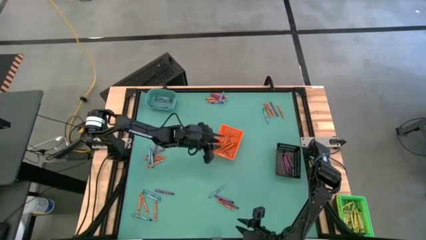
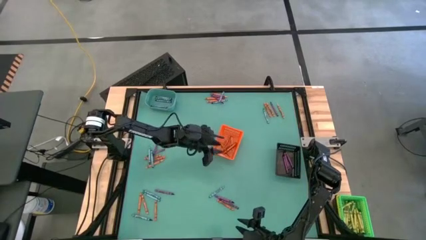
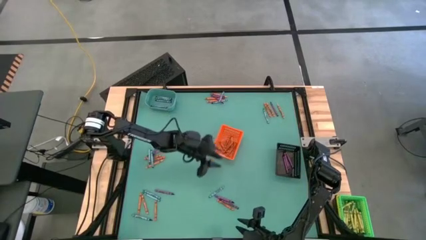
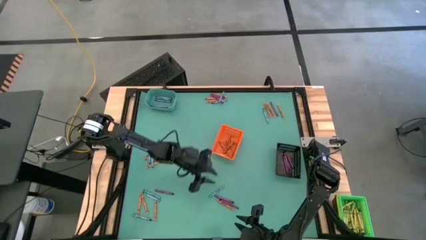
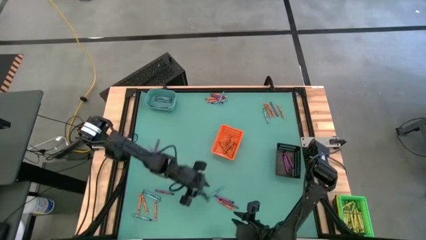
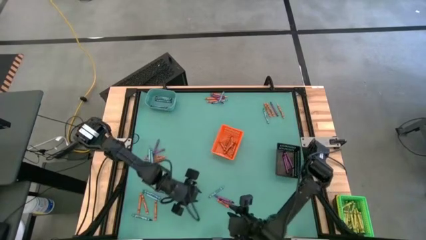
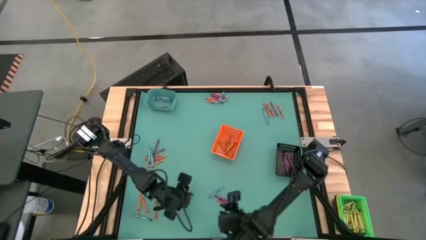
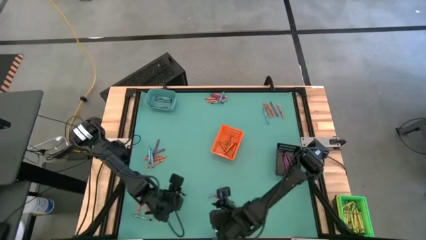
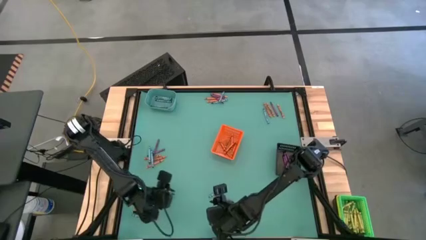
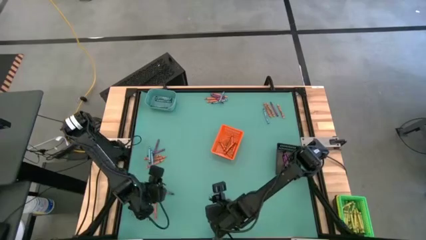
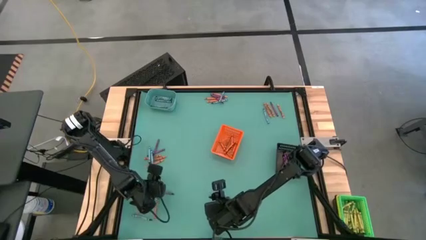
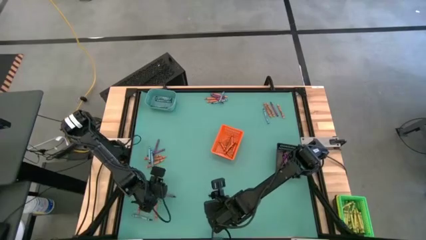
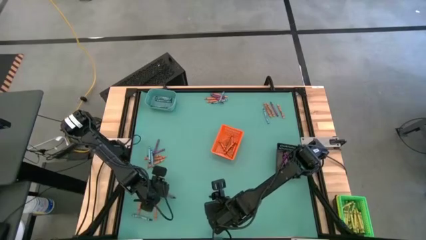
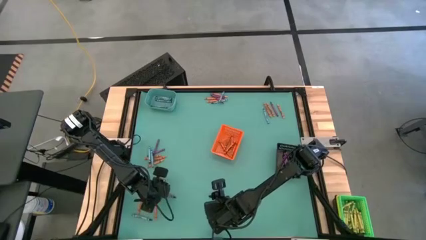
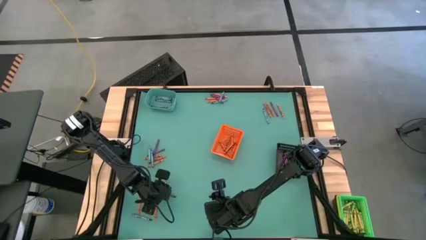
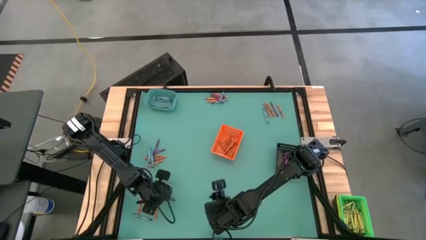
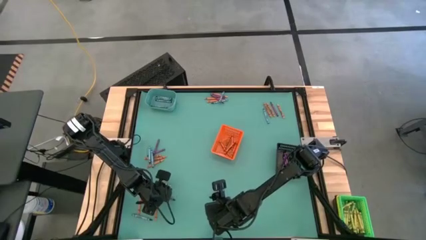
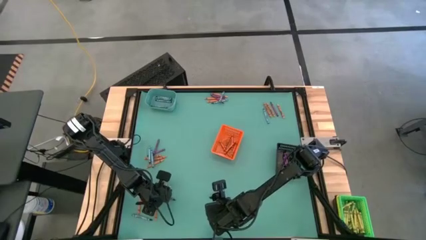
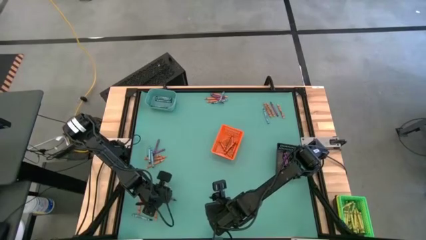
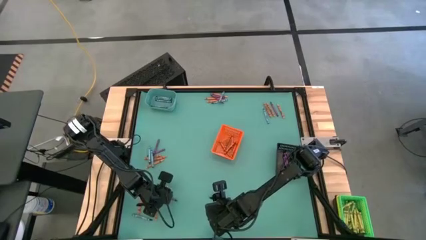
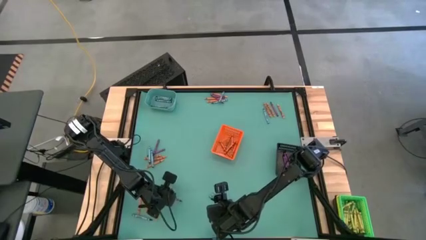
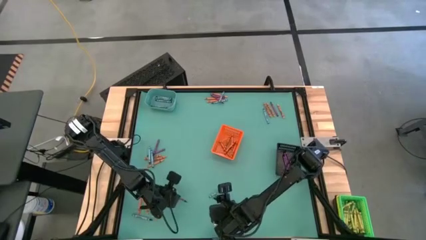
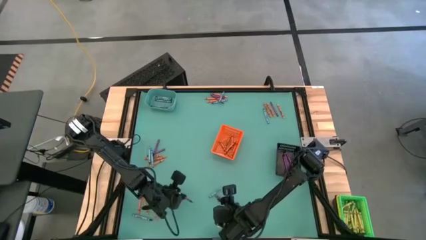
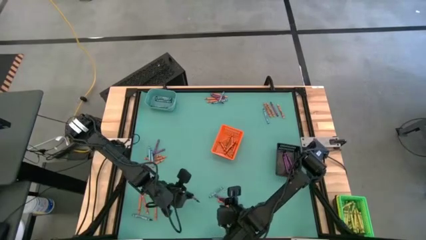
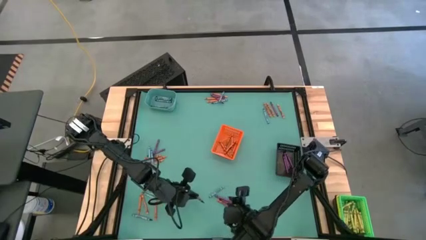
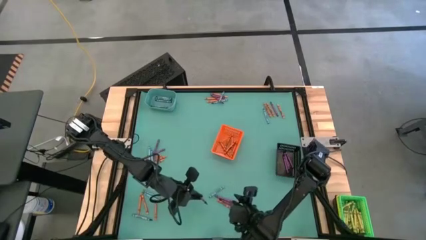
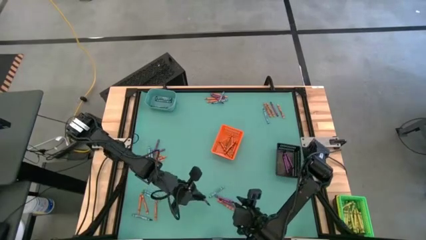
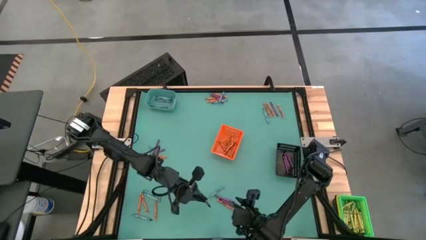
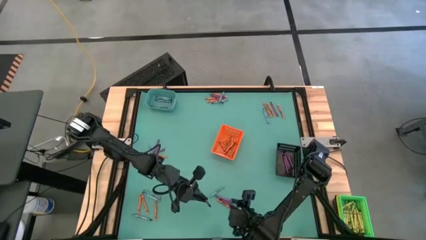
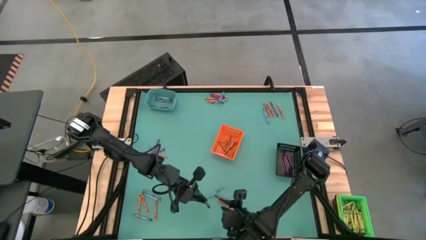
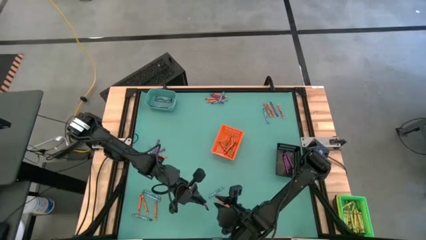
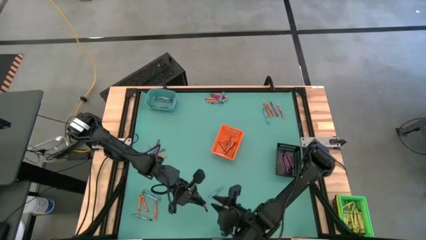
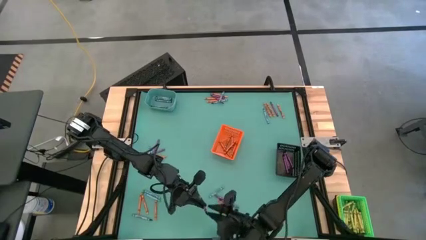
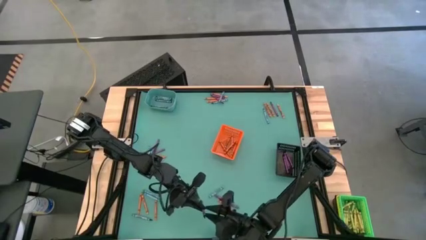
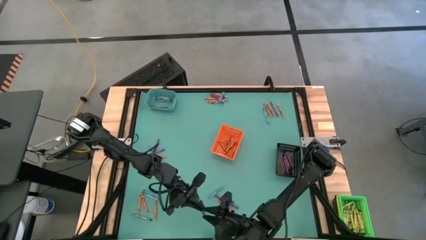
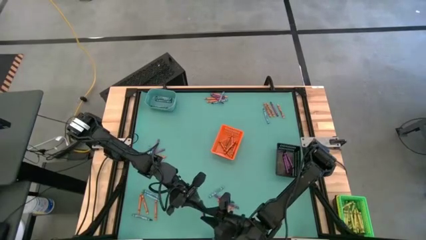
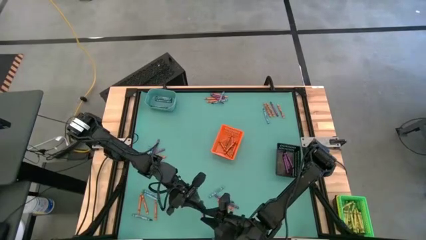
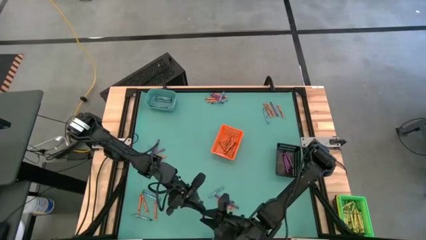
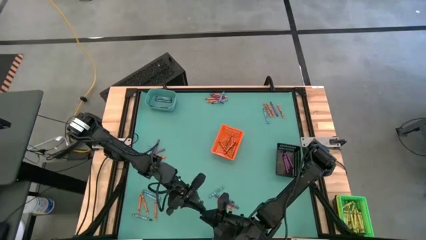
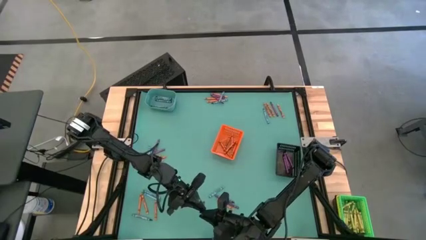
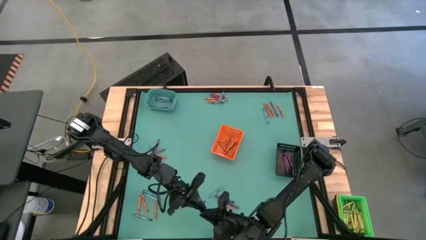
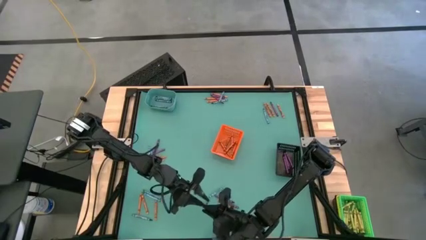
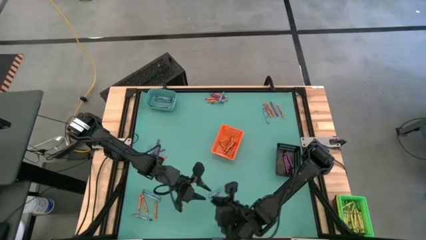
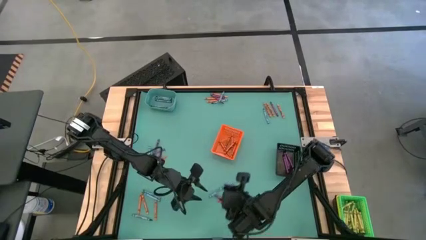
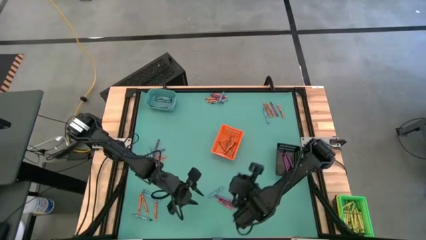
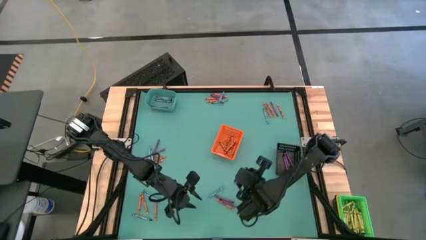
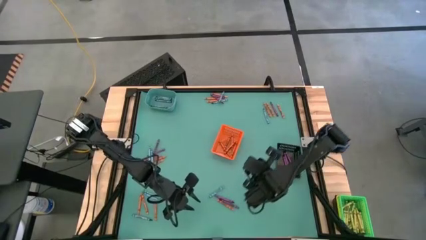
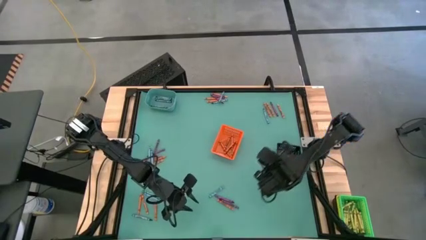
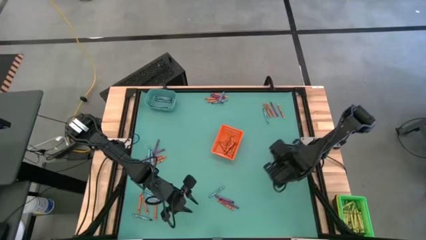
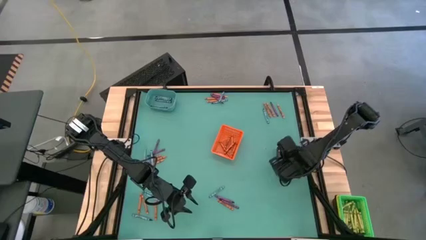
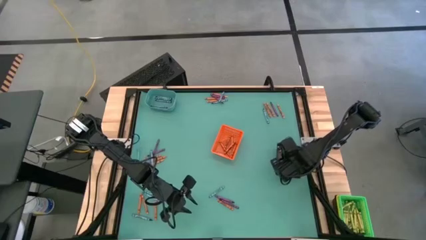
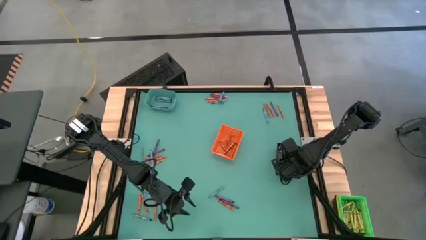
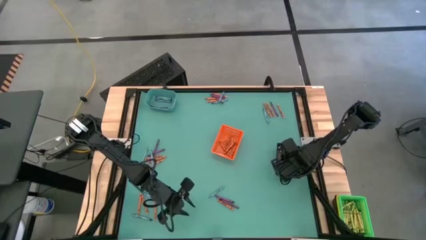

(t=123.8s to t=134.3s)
Task: Sort crayons
Put the violet crayon into black bin

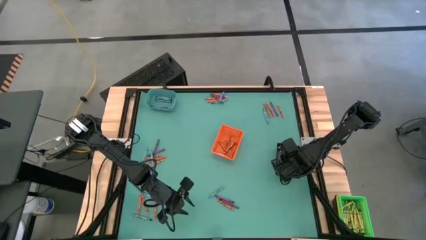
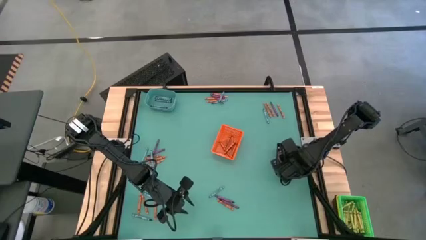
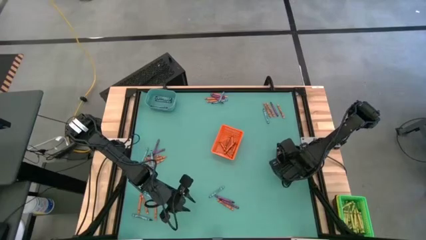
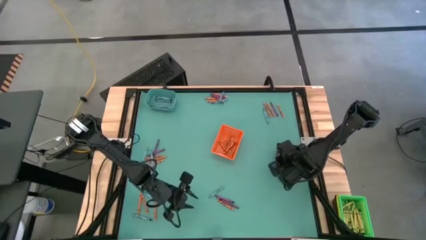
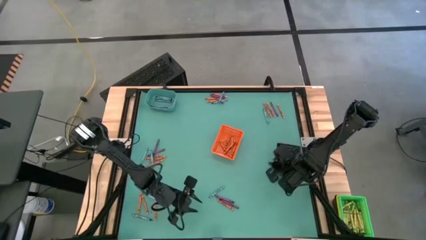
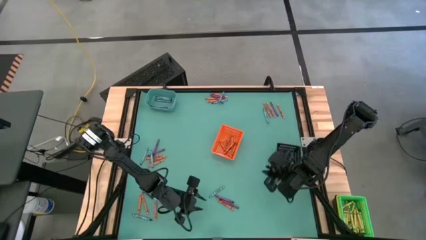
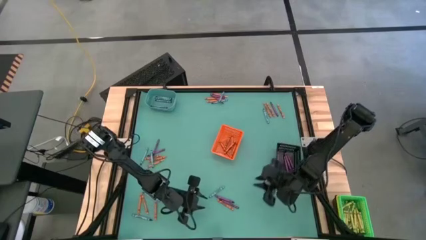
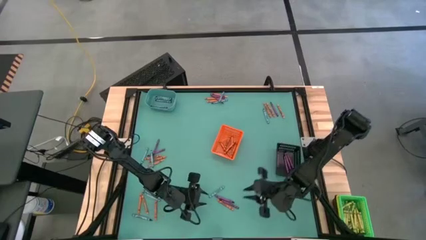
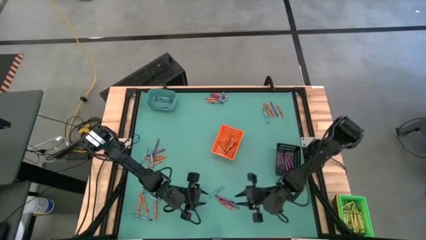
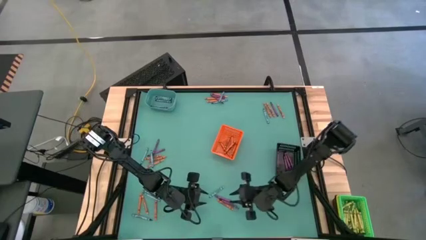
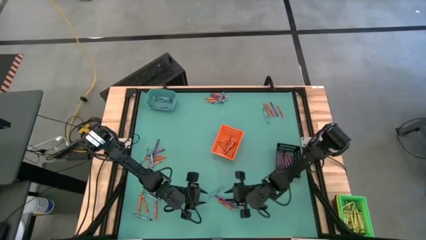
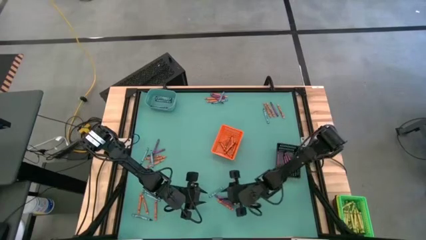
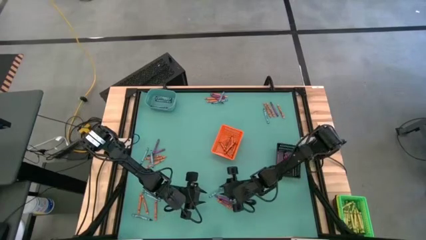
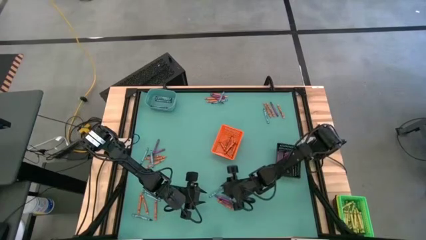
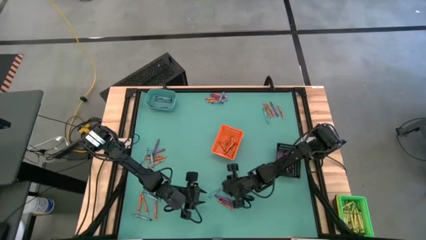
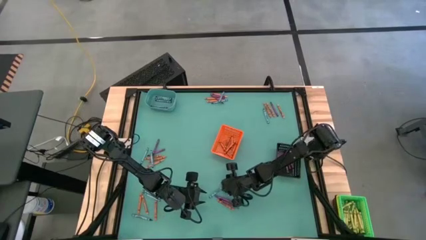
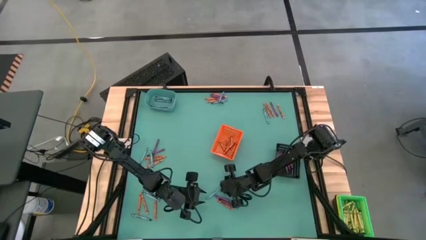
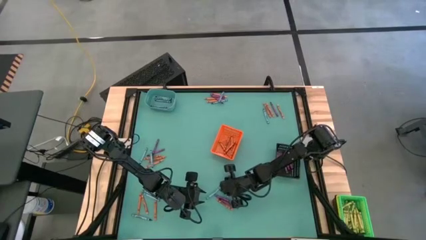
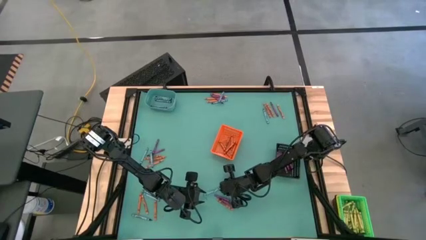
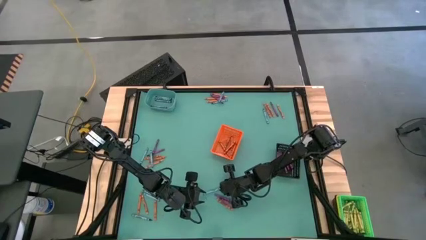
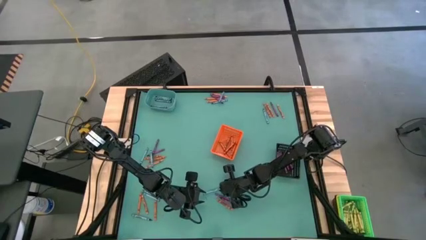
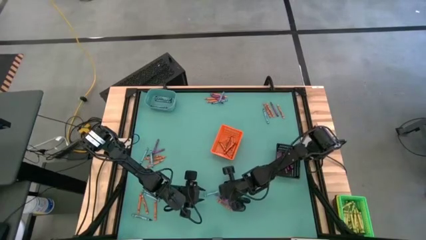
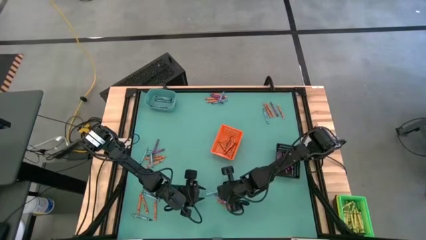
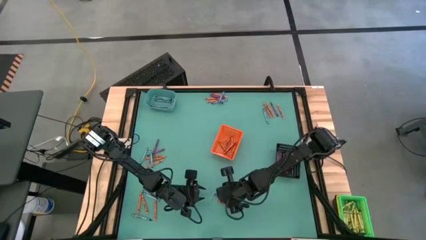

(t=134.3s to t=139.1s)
Put the blue crayon into the blue bin
